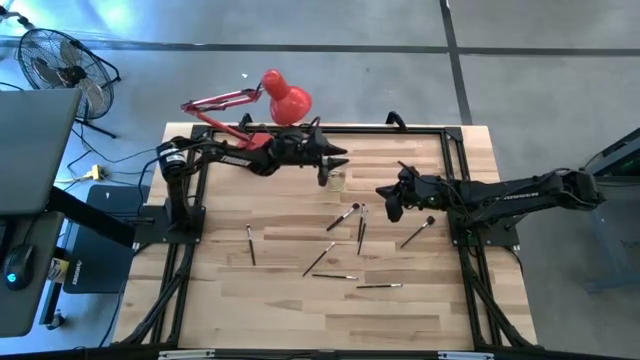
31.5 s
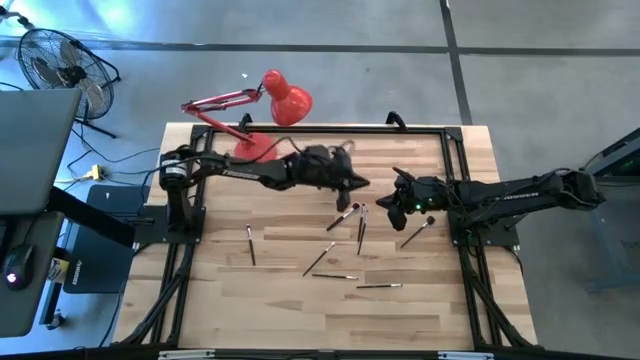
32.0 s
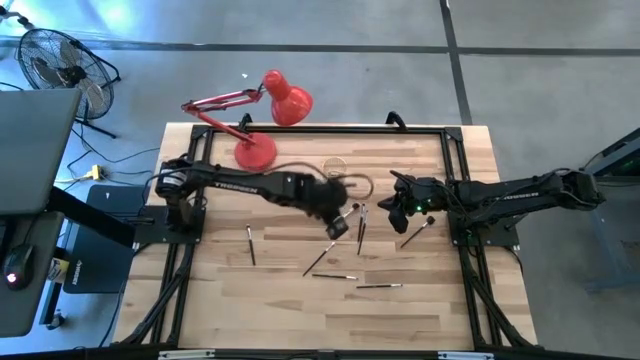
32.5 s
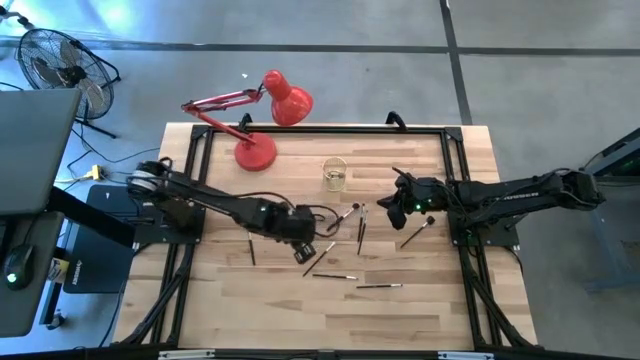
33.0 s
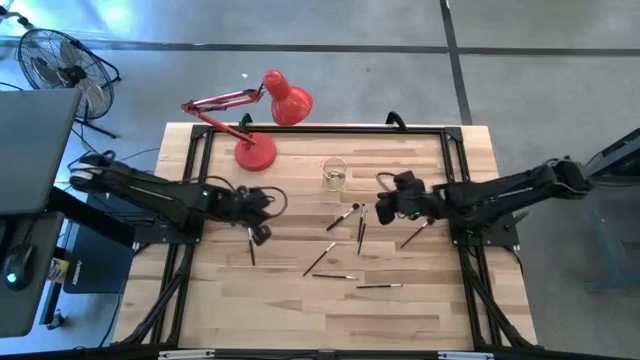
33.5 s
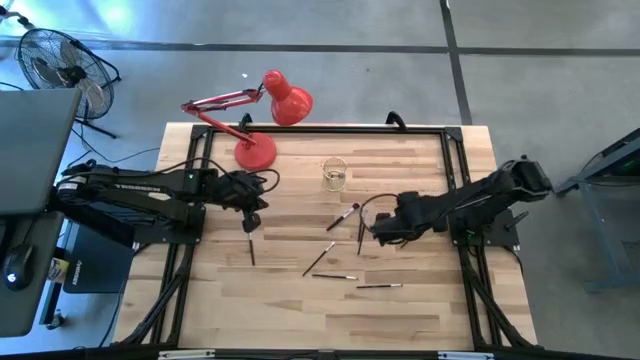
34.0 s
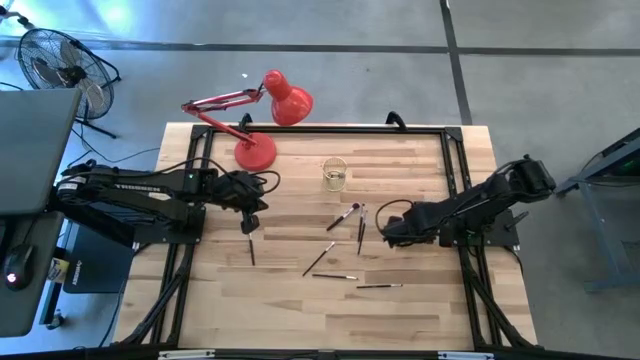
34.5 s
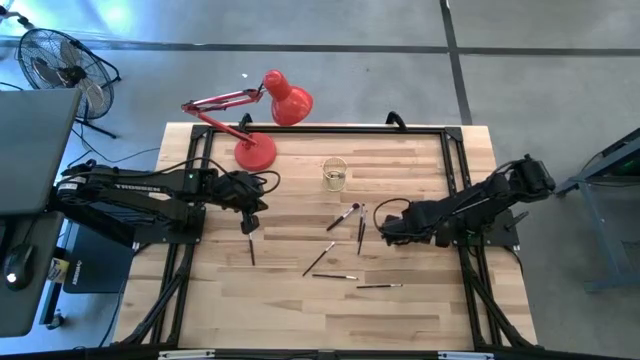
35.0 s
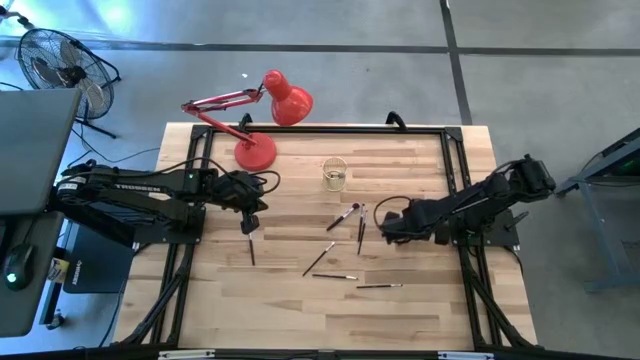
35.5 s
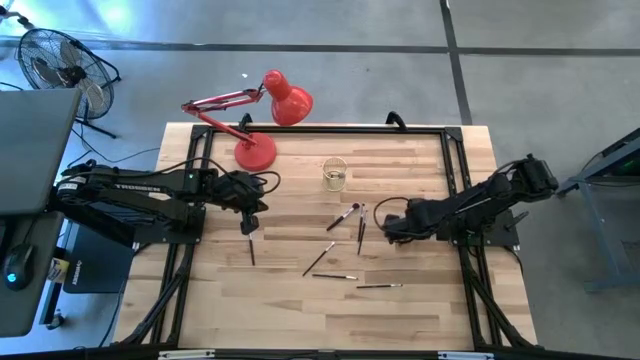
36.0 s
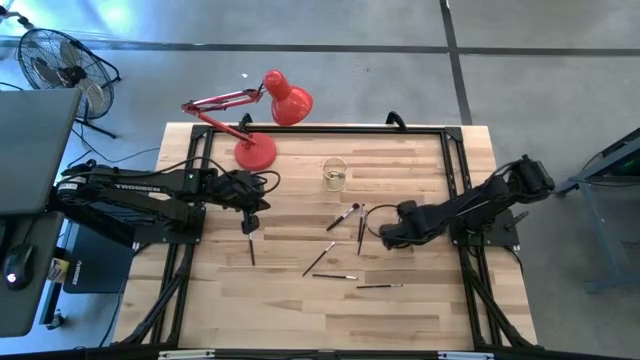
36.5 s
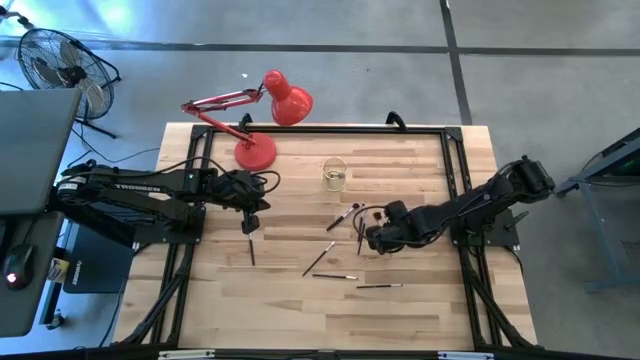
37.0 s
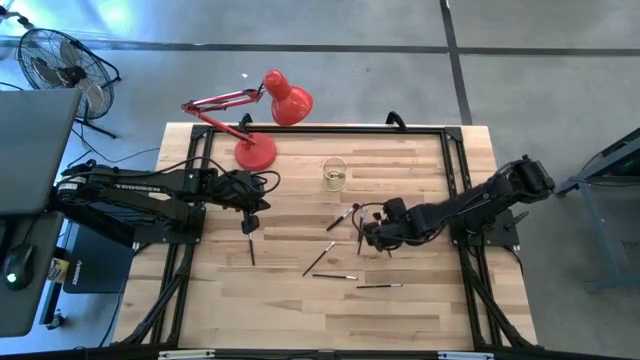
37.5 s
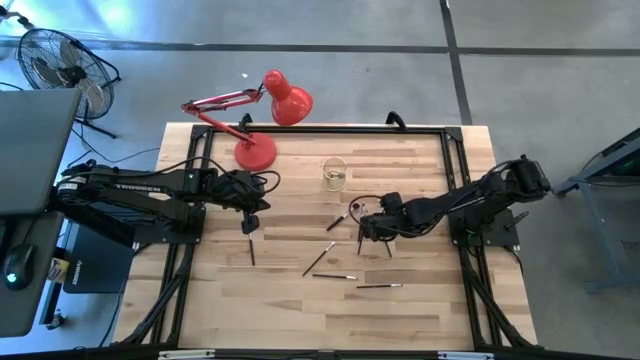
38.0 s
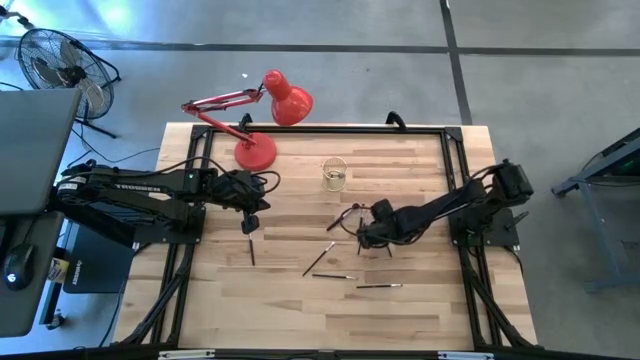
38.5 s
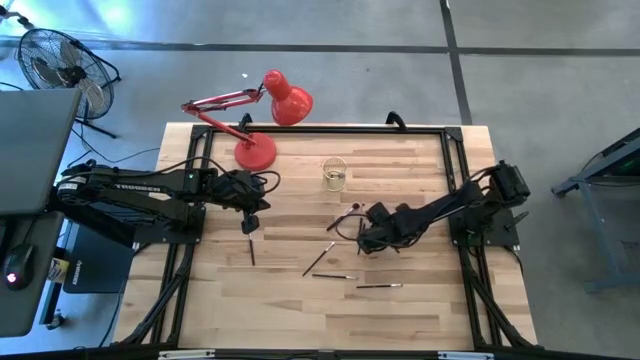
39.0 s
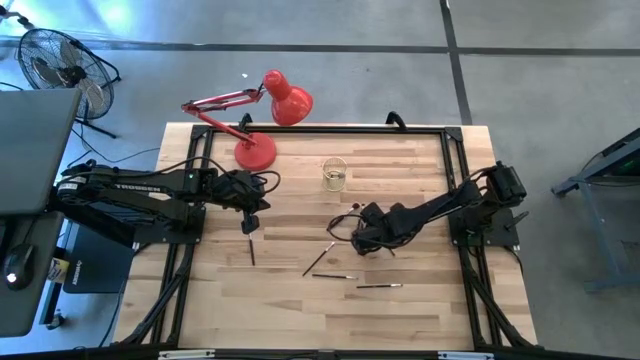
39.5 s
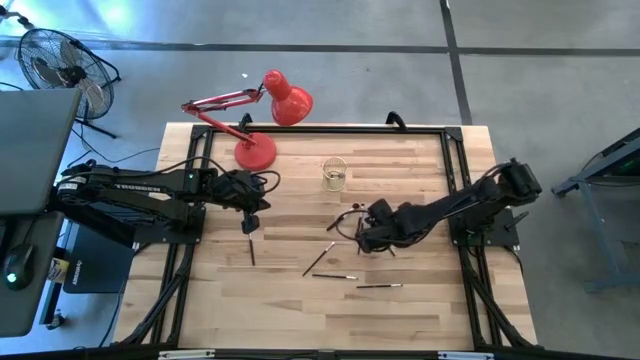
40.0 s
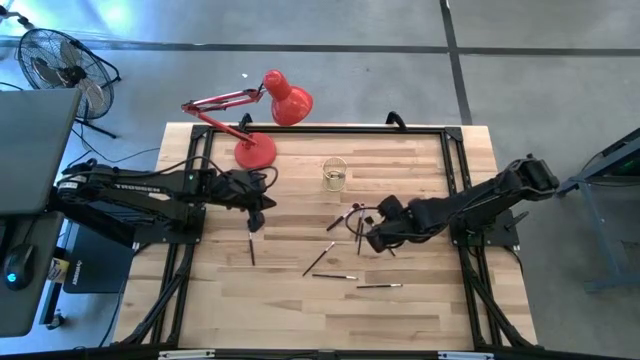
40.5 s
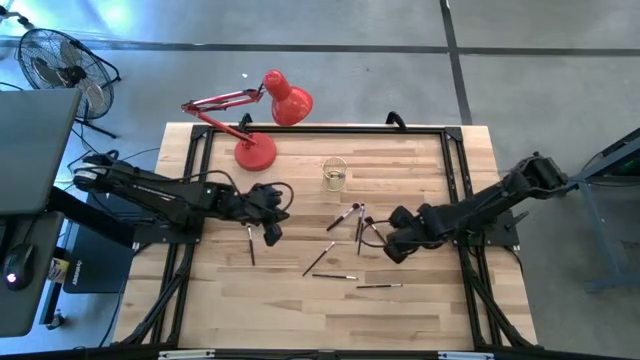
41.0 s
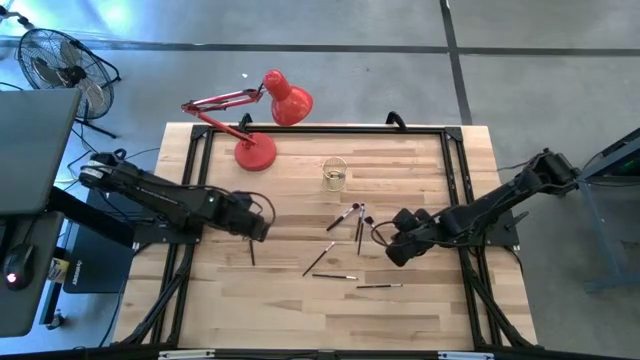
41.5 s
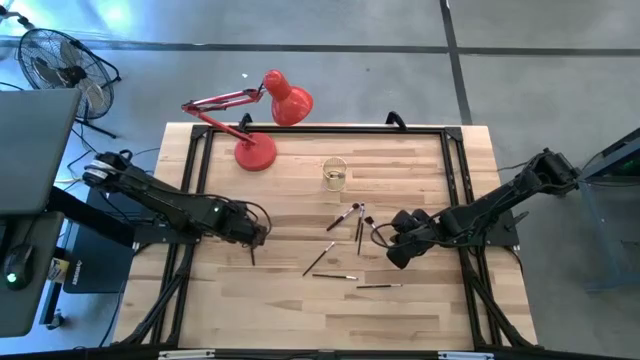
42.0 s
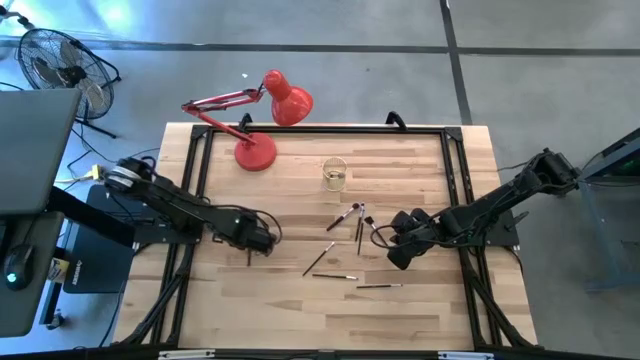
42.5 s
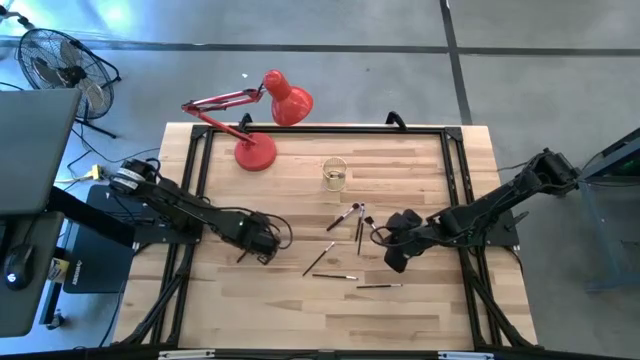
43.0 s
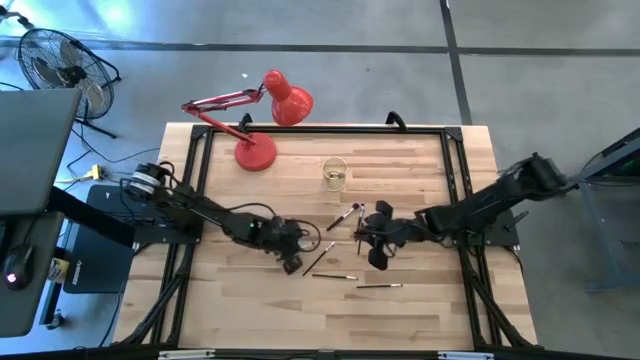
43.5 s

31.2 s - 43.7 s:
Task: Put items in baskets/containers
Put the makeup brush into the wire bin

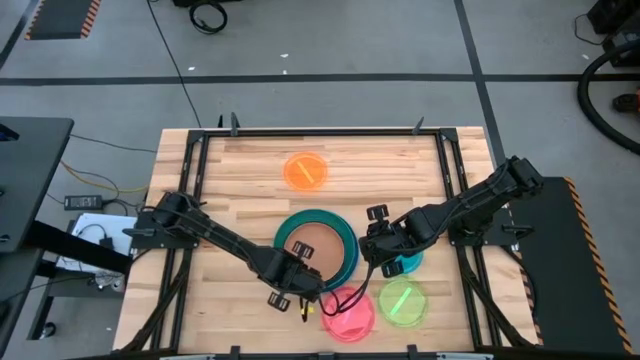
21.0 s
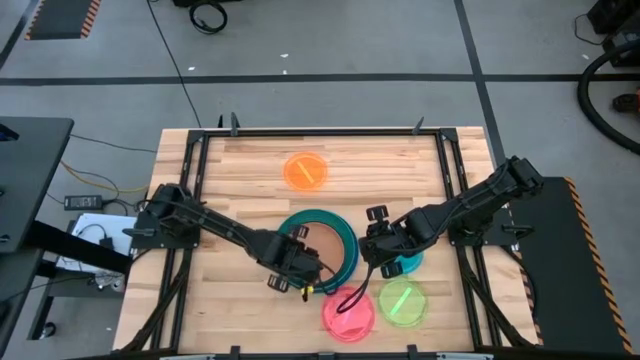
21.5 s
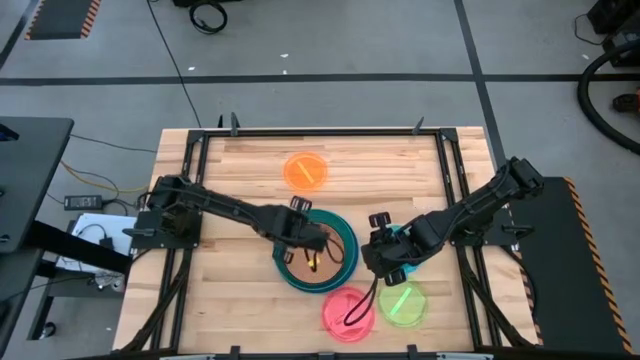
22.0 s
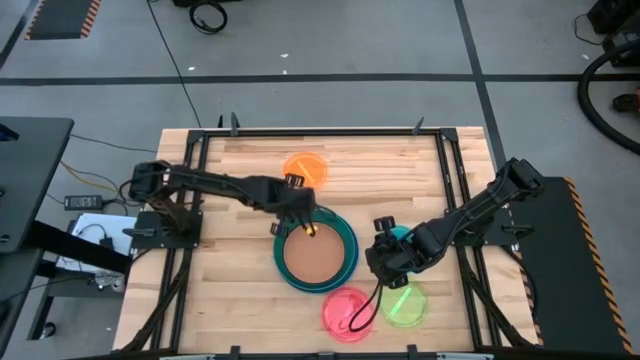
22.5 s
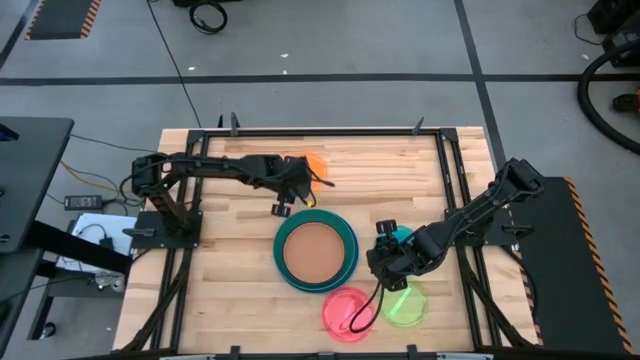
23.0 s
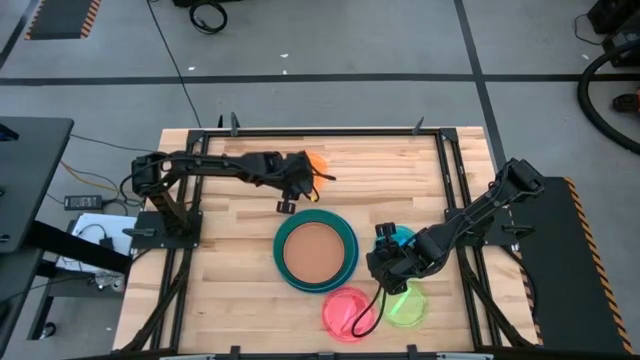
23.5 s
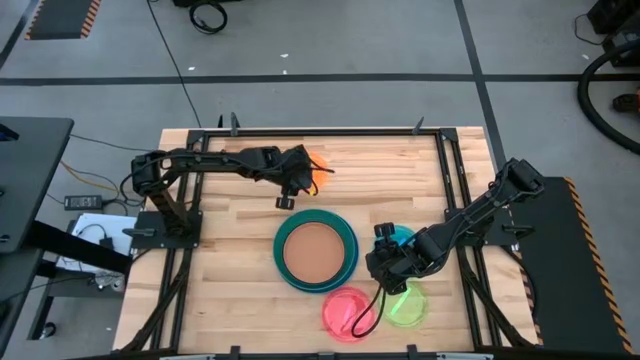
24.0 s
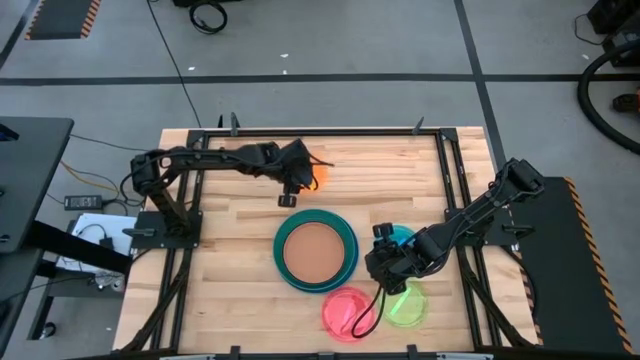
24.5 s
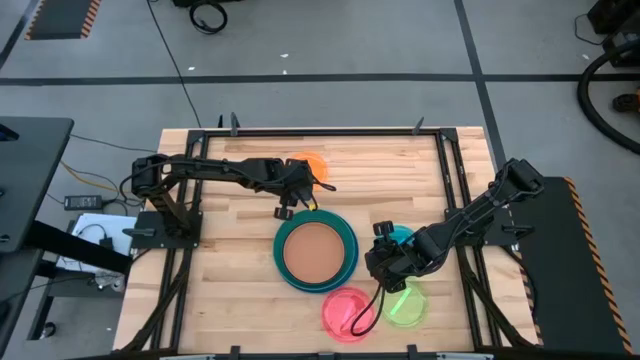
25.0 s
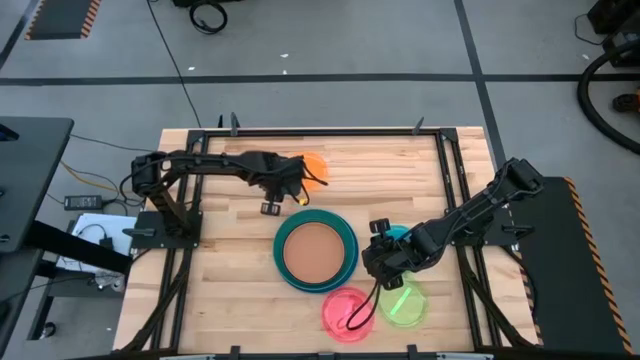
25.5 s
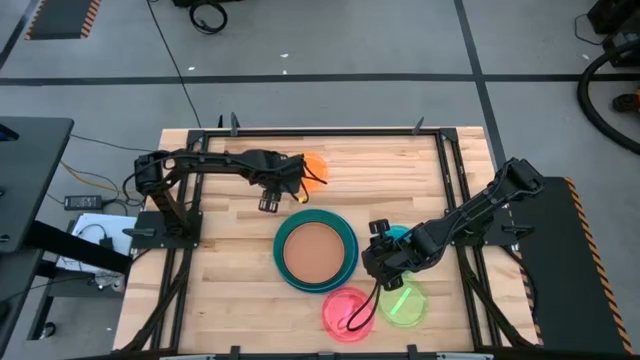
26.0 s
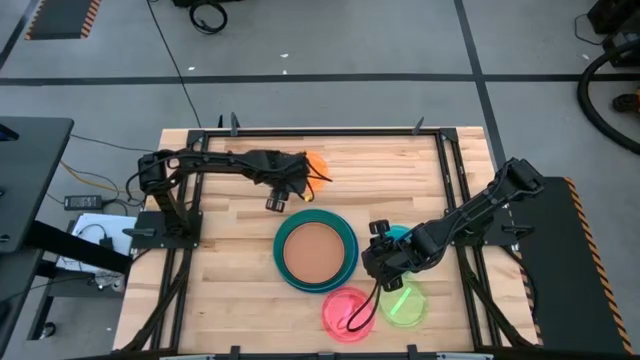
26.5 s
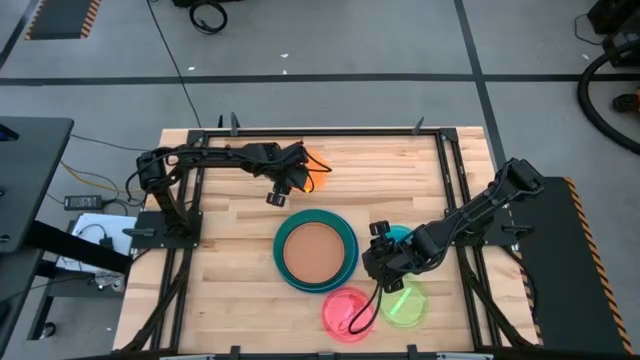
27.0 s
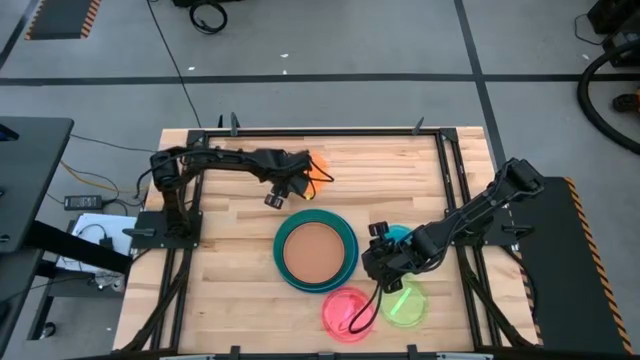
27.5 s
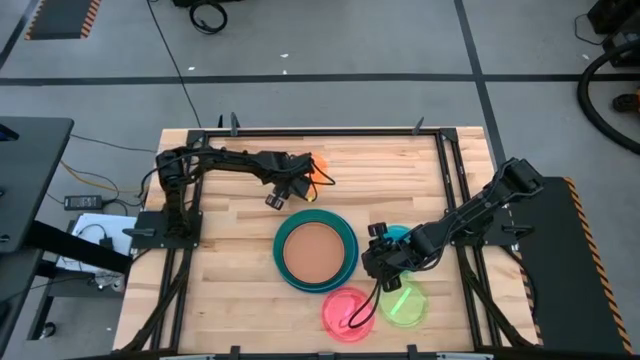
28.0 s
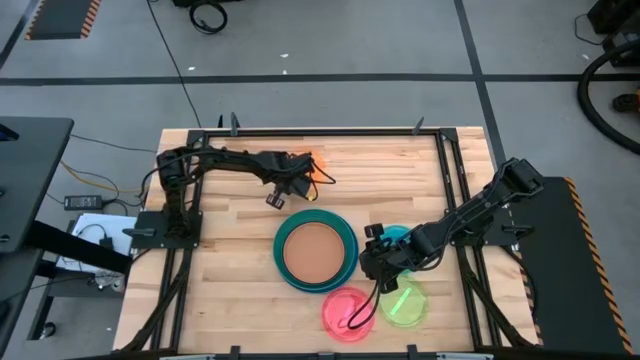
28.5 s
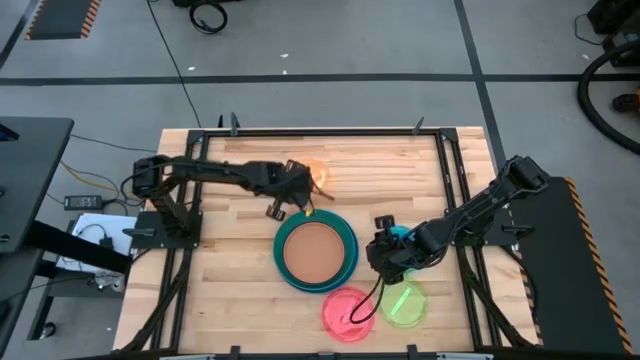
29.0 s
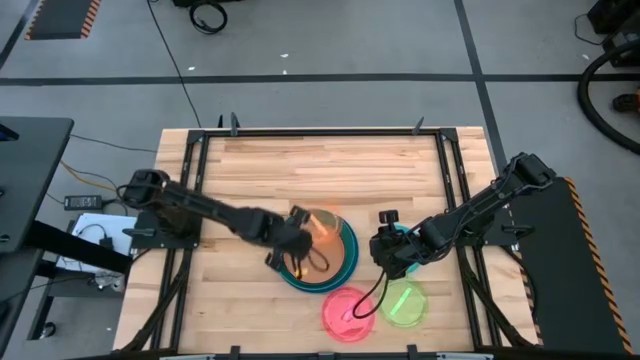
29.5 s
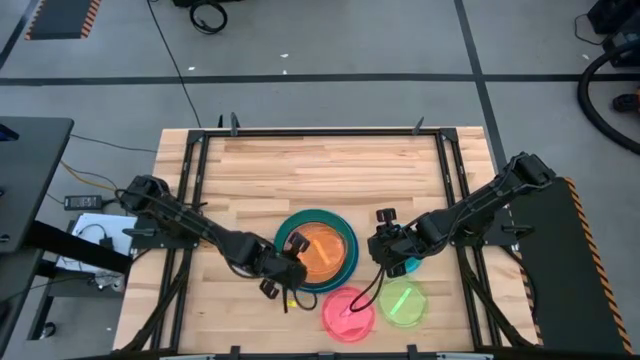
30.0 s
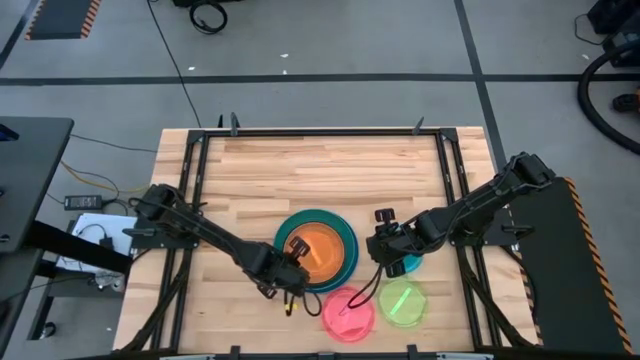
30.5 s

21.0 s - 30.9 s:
Task: Stack plastic plates
Stack the orange transparent plate on top of the brown plate
